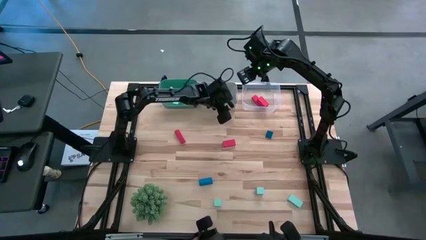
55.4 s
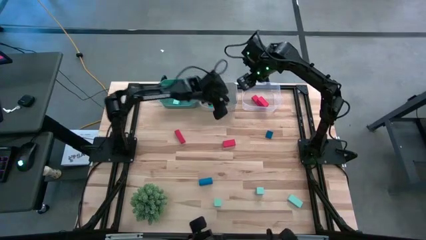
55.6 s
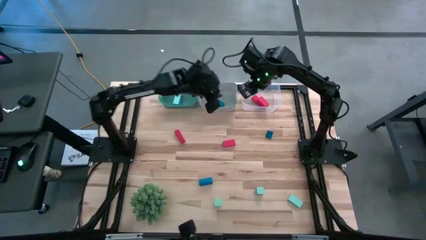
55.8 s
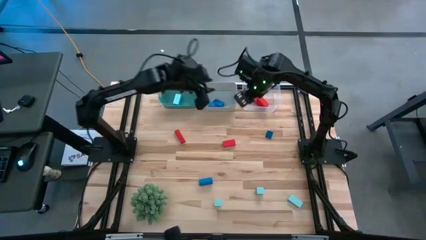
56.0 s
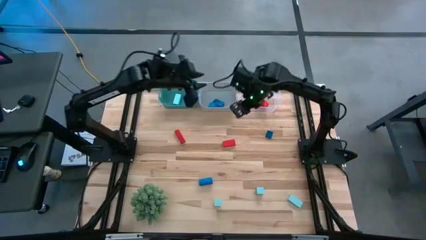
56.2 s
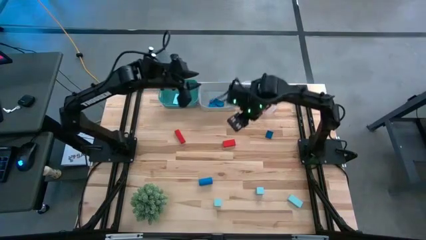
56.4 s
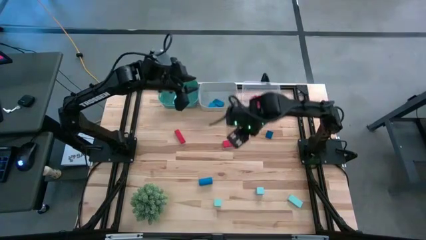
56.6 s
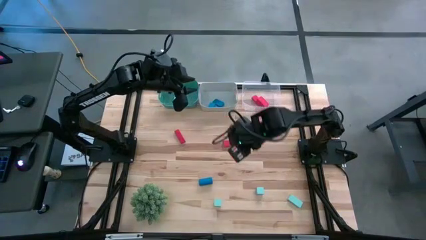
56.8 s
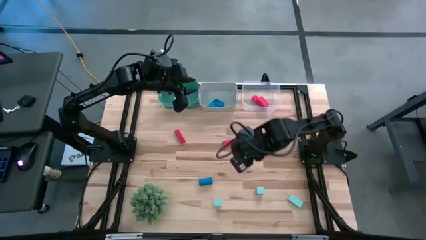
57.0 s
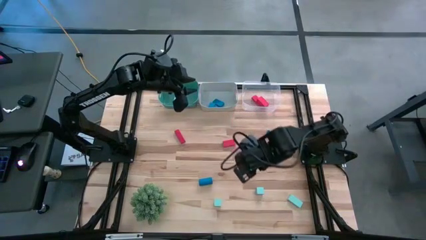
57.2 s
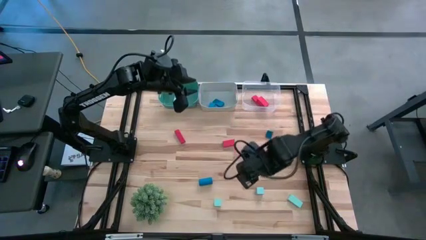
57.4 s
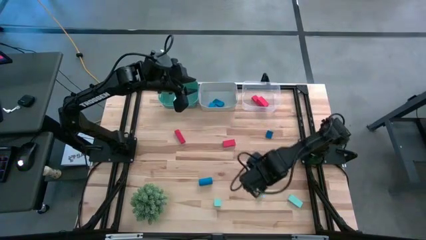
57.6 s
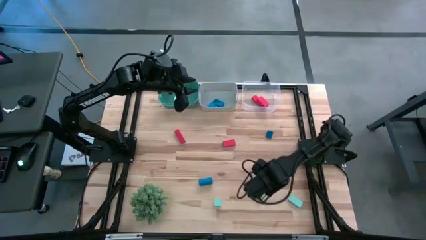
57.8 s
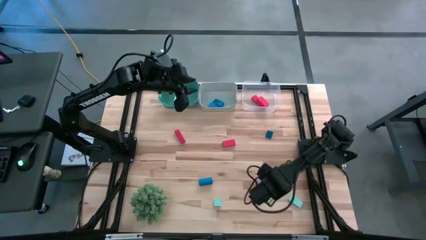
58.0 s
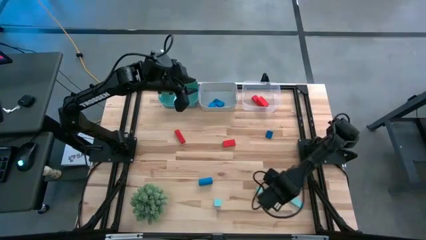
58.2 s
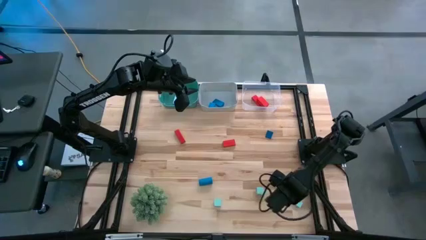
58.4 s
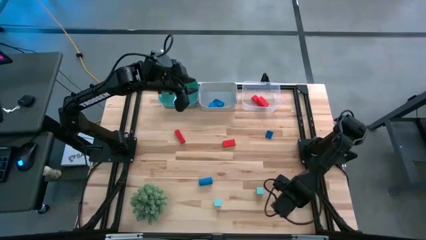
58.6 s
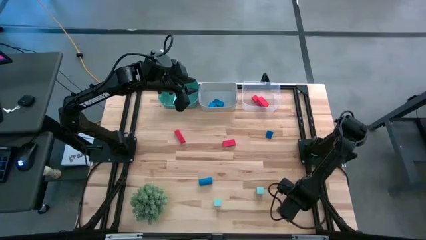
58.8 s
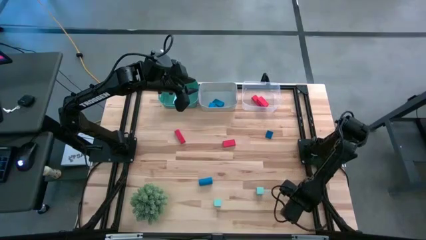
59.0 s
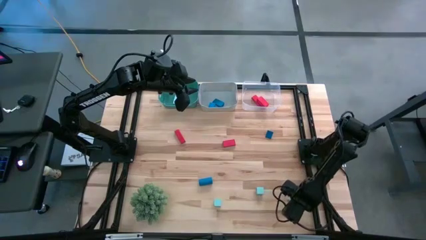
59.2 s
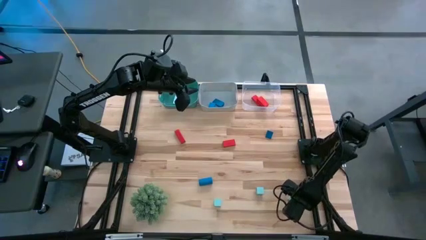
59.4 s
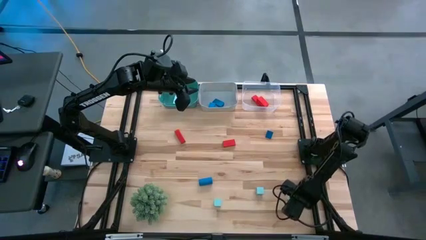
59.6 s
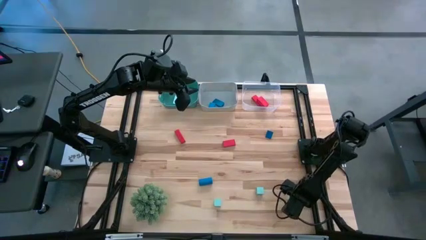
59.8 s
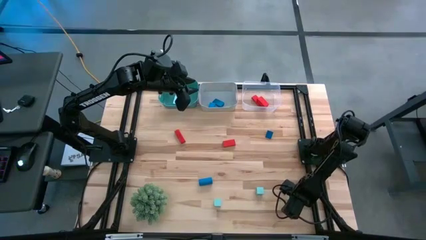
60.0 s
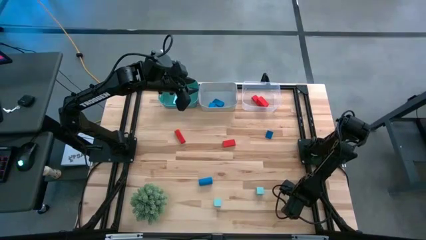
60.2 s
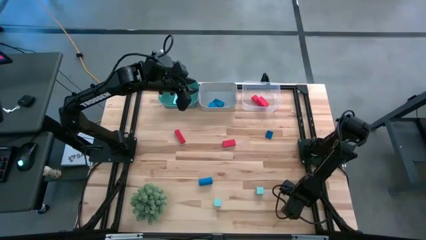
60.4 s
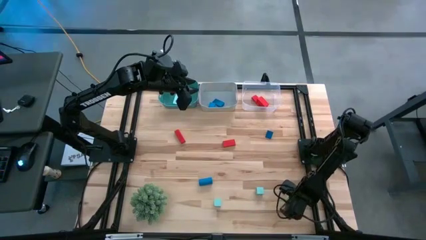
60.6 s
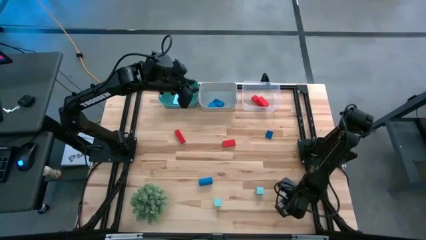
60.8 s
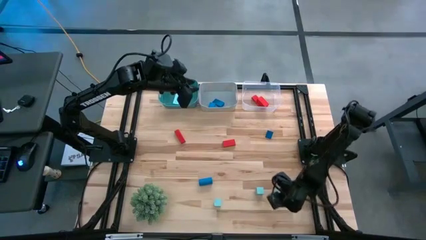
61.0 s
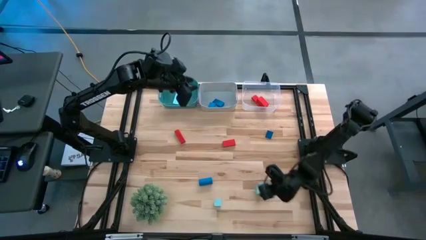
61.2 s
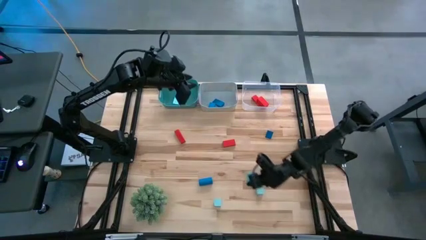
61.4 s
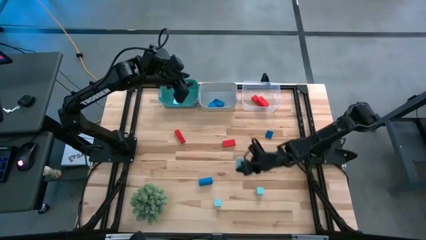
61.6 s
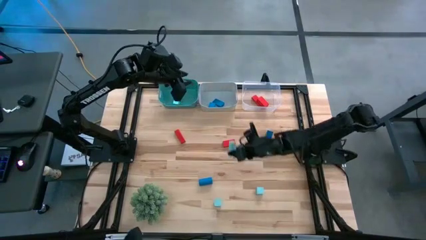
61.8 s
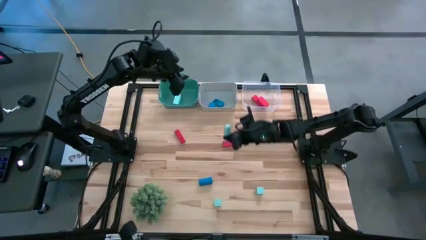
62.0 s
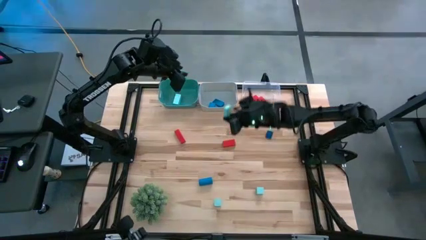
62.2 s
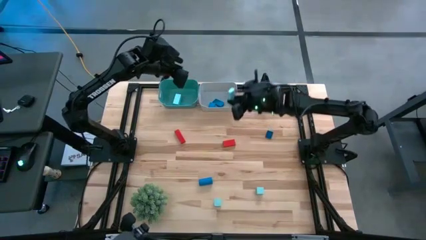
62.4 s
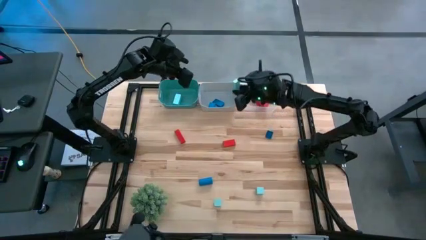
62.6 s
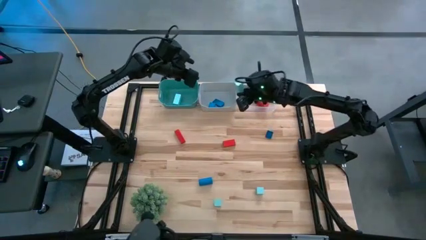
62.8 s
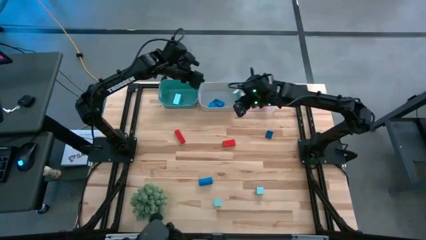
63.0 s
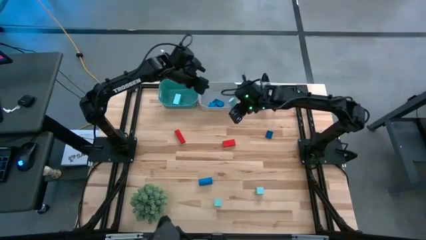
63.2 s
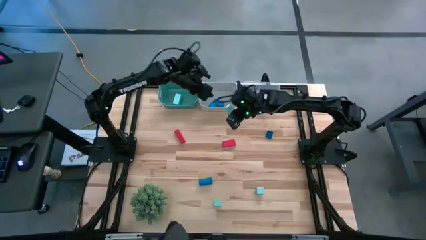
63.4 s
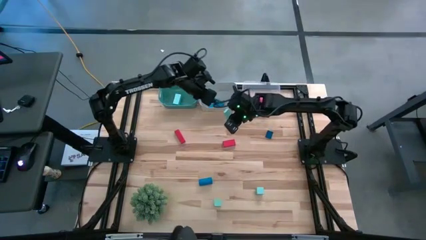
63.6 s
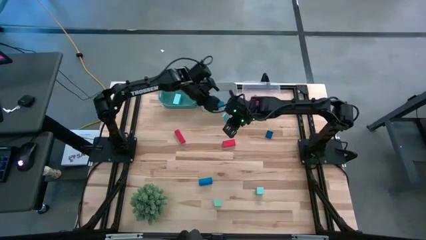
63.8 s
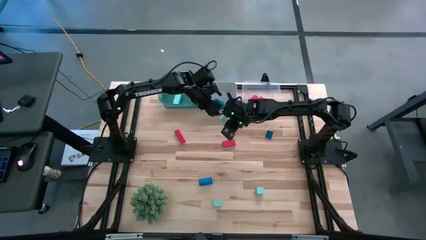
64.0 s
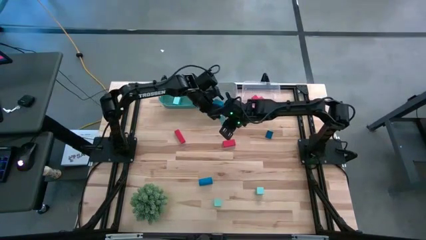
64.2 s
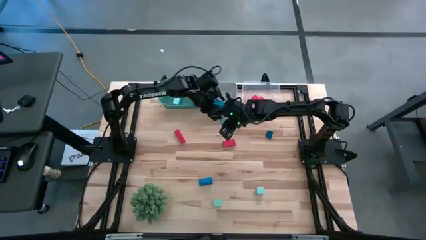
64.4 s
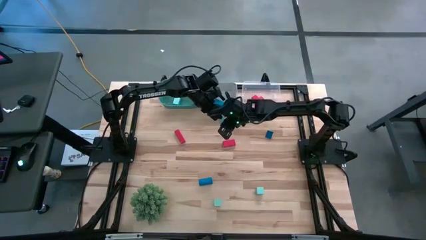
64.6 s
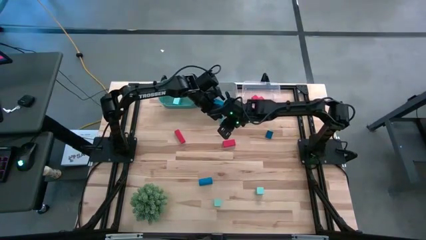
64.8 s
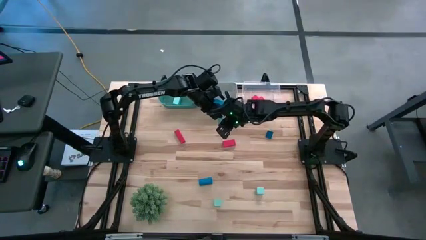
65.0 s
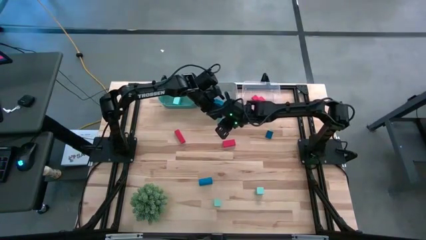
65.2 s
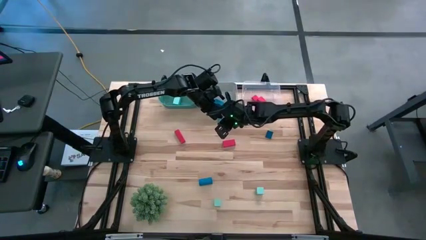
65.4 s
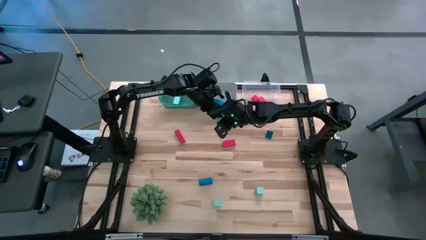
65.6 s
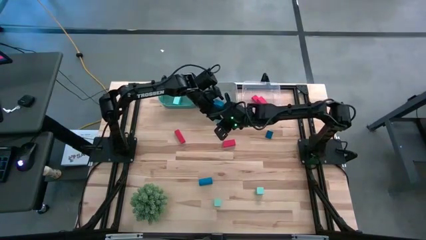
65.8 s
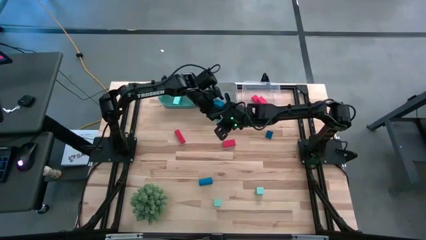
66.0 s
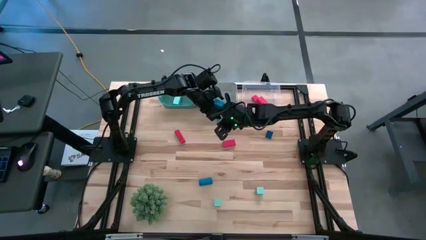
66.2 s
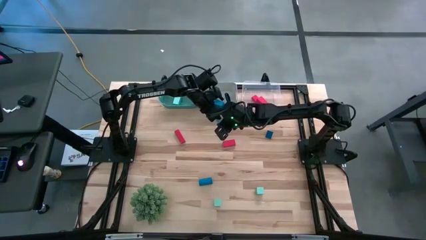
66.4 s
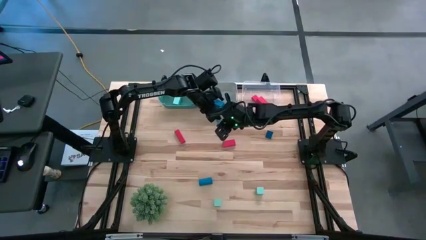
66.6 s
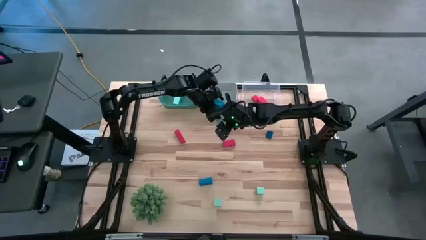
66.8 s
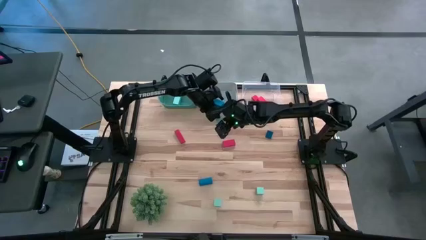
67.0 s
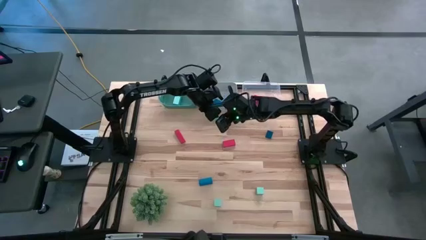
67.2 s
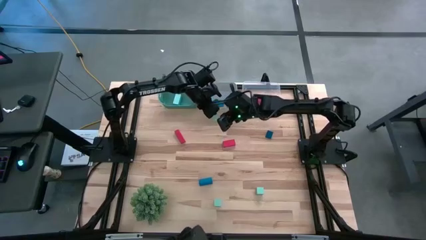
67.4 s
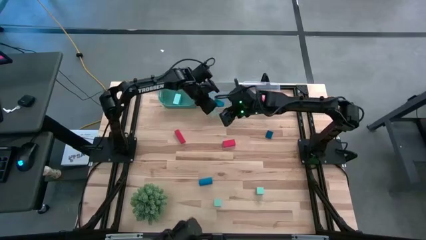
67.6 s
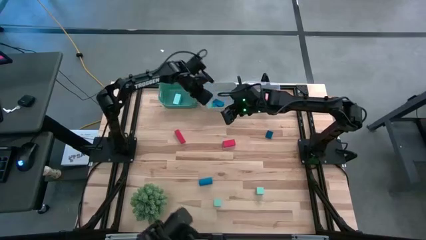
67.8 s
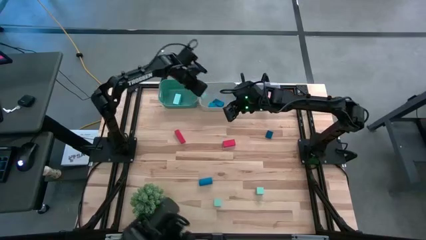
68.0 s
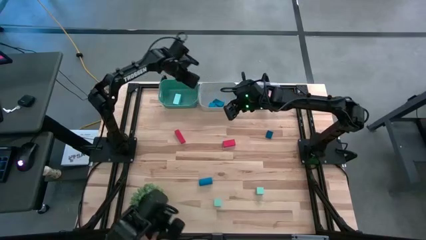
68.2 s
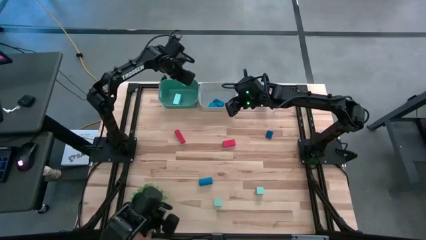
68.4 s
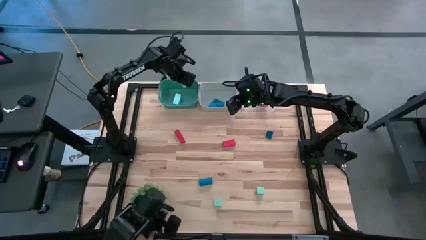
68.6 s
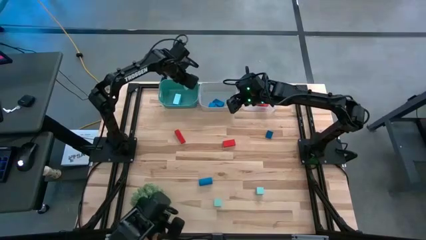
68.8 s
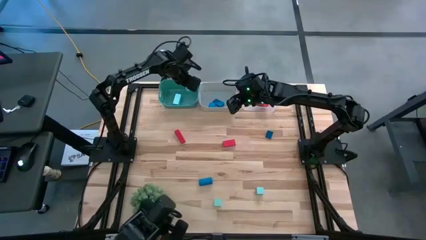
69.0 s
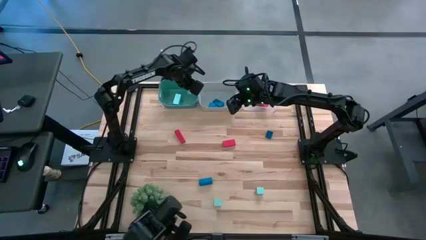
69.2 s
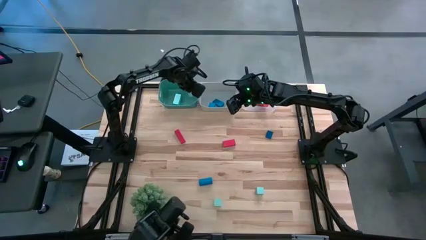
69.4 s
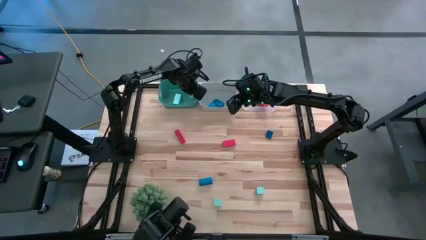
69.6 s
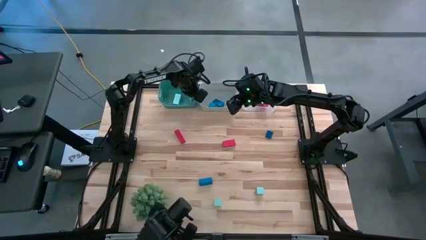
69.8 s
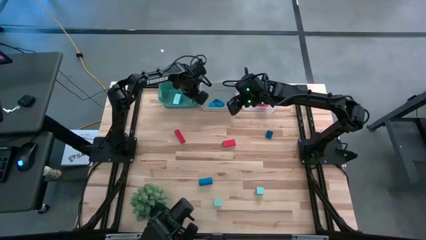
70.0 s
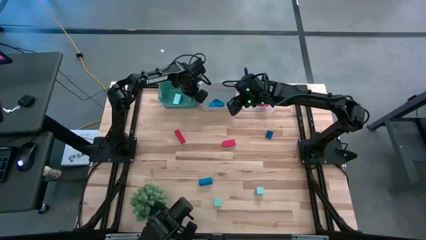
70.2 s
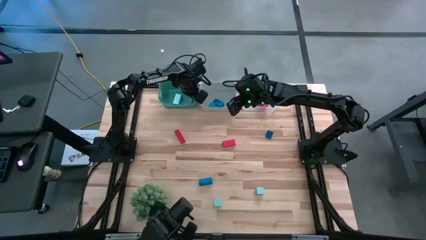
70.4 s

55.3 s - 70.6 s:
Task: Sort & place blocks by color
Put the light blue block into the green bin
